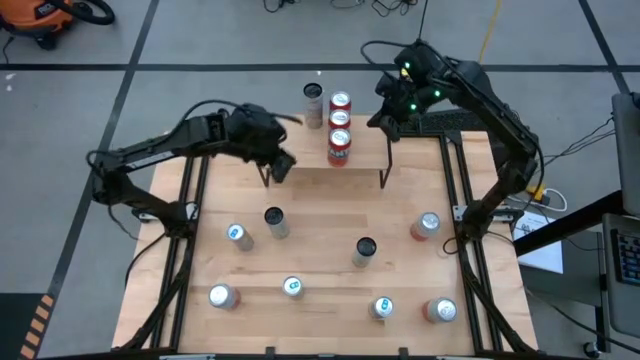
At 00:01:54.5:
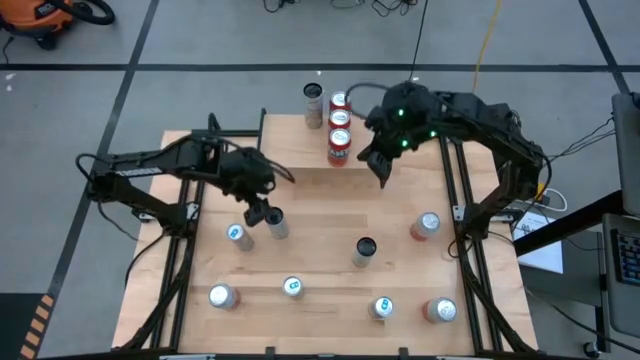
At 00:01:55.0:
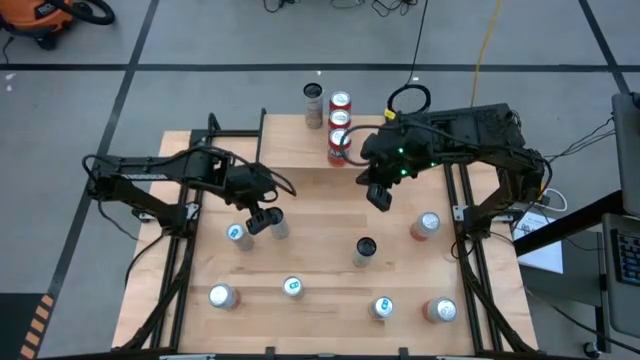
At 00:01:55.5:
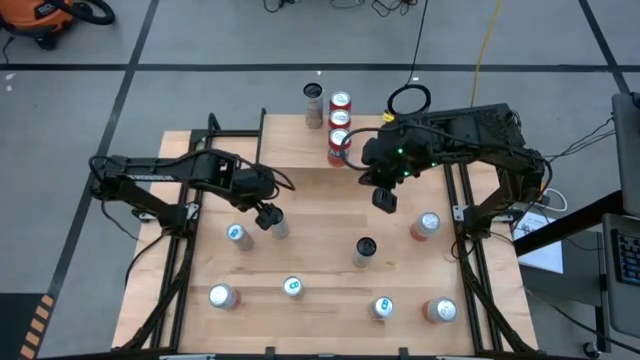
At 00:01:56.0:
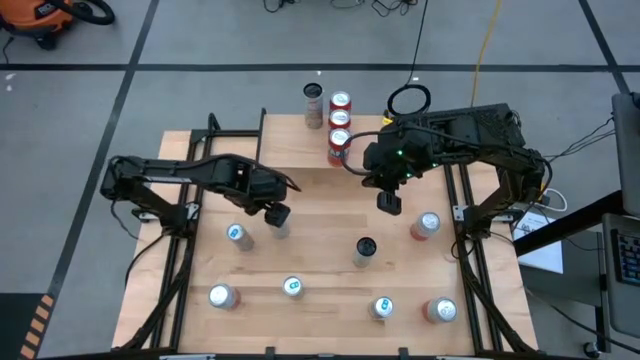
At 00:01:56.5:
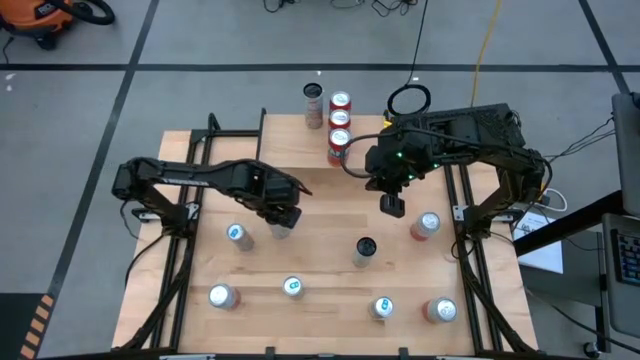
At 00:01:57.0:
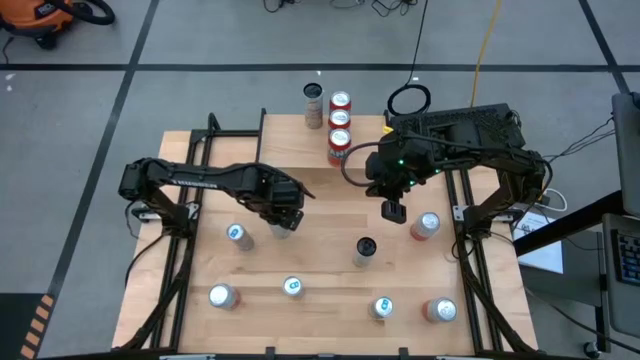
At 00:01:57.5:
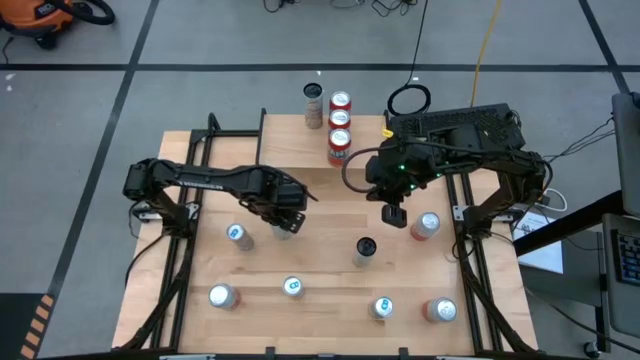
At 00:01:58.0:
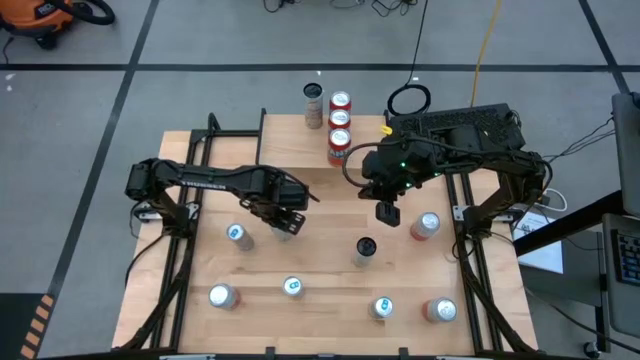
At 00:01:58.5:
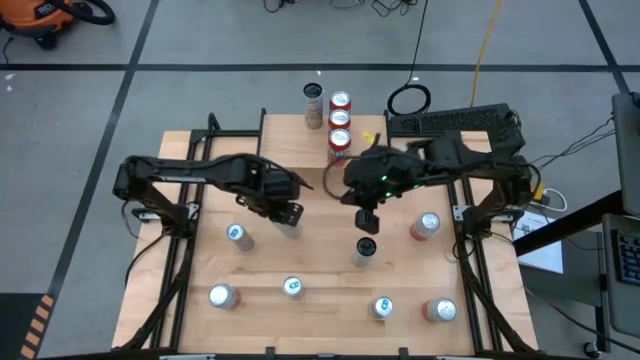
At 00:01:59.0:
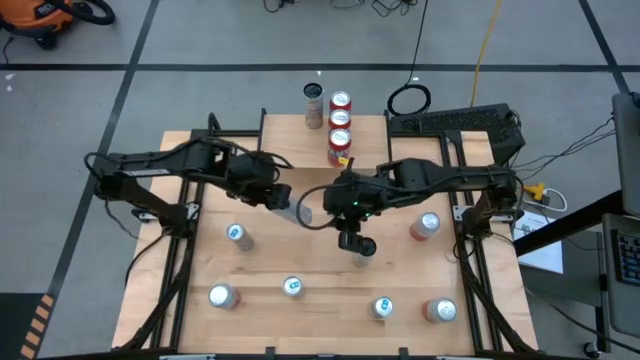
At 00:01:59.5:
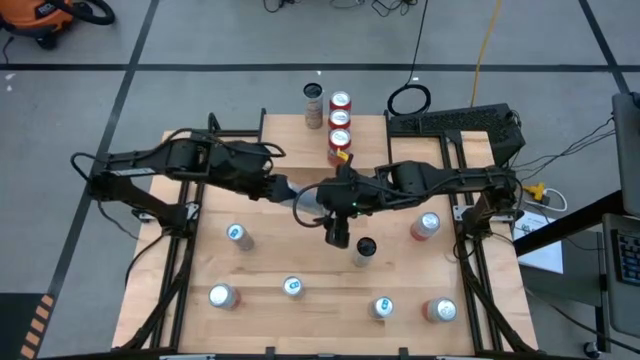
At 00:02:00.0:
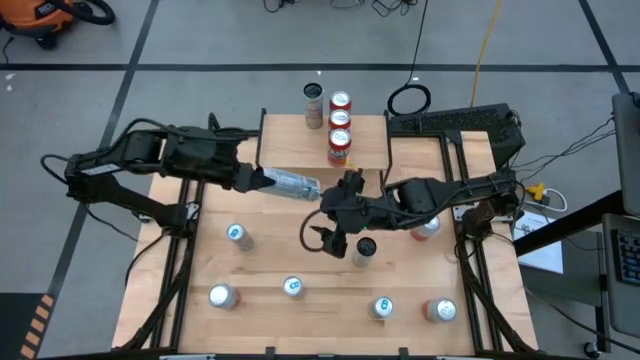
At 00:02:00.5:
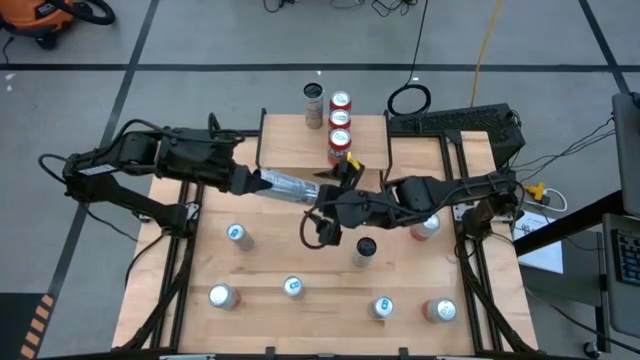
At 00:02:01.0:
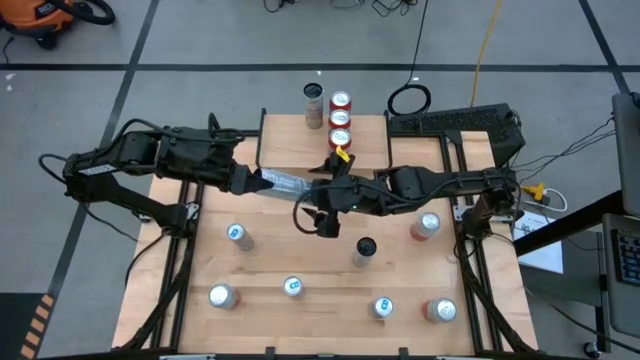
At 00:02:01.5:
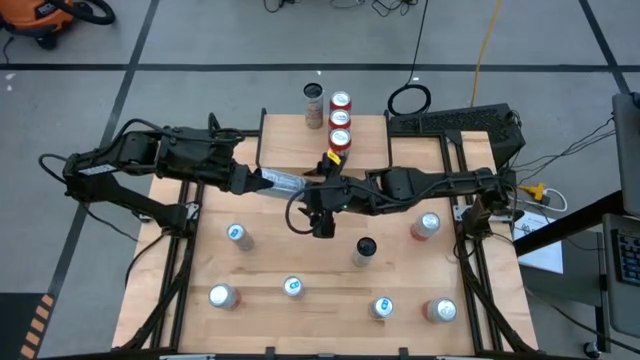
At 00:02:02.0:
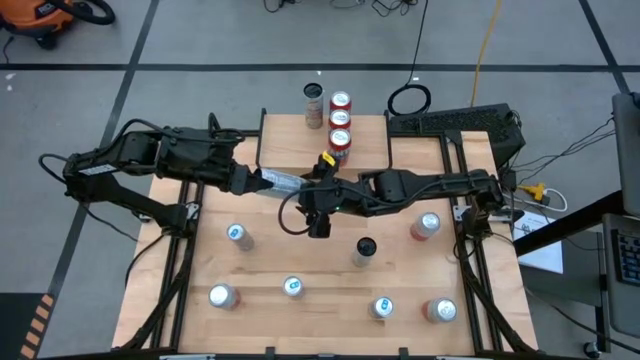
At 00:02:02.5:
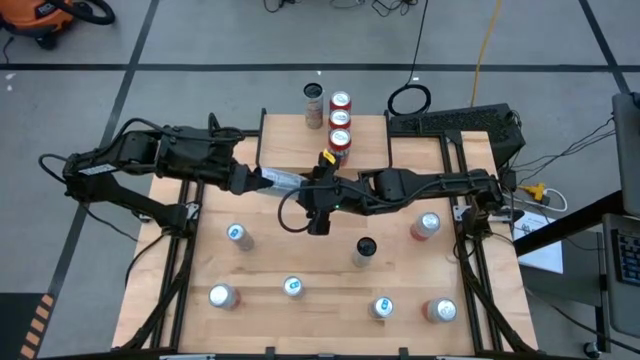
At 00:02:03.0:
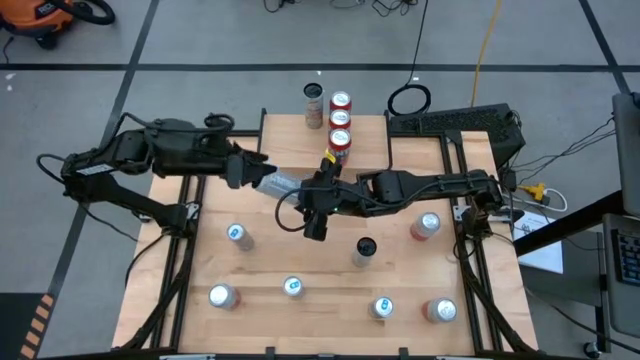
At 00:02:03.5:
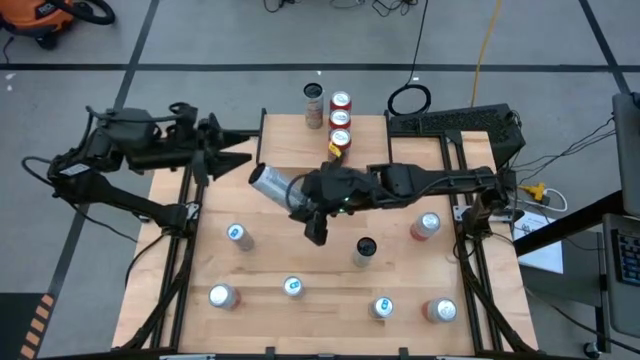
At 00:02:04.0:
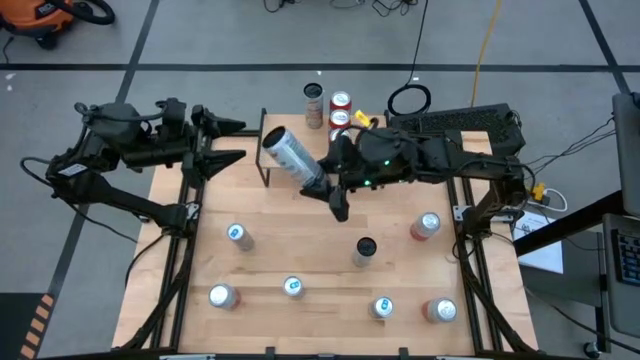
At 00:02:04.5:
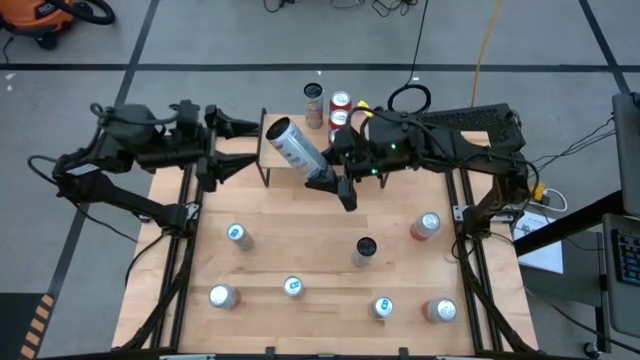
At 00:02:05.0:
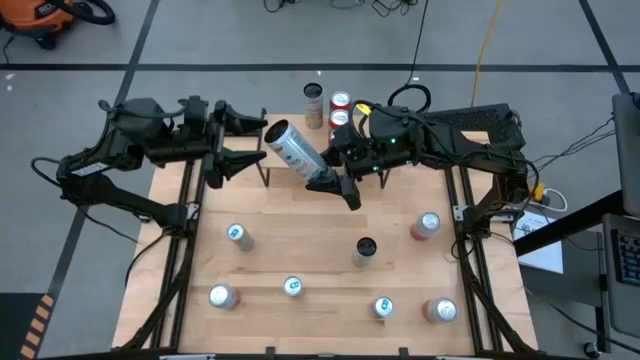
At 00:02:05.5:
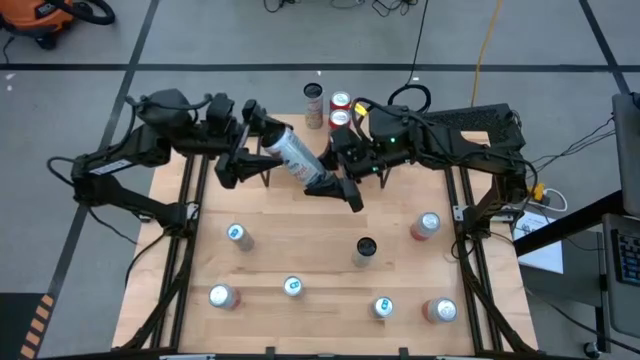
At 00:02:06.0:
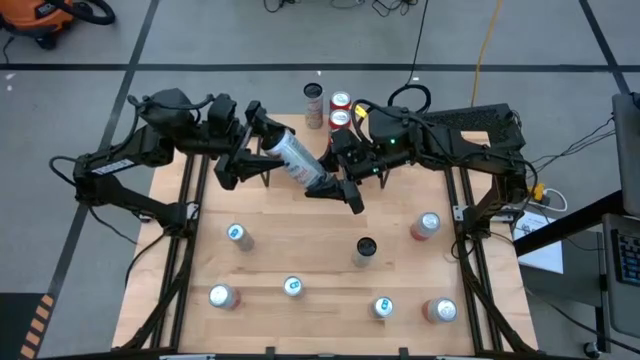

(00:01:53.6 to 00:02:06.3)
Task: Place canned beverage on shelf
Put the left white and yellow soda can aligned with the other white and yellow soda can on the shelf
